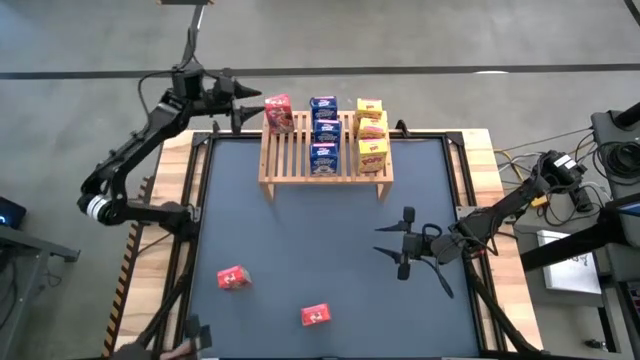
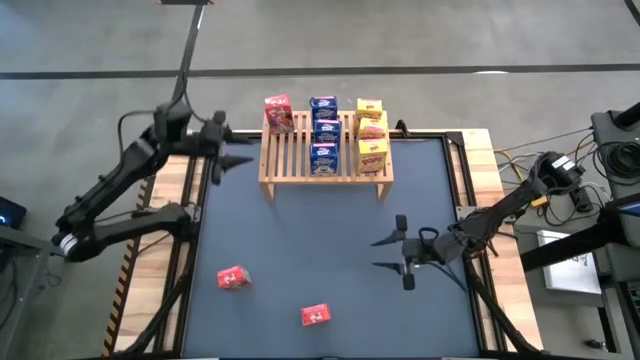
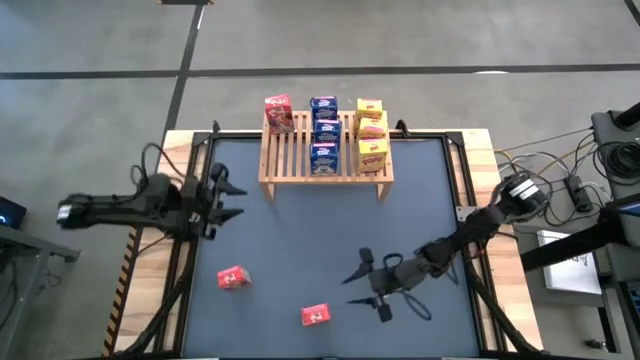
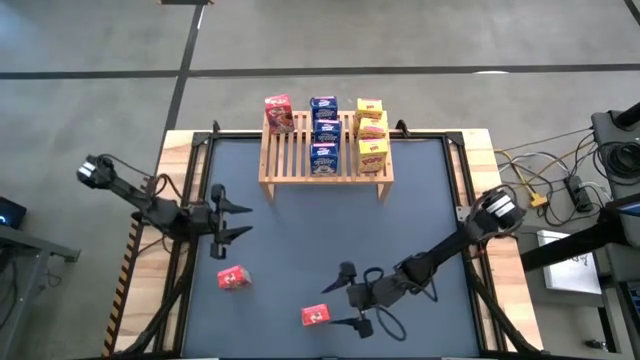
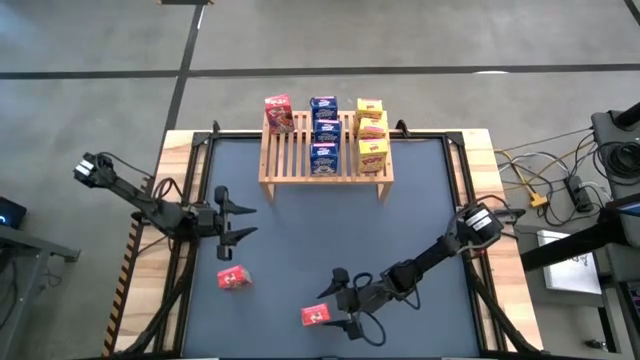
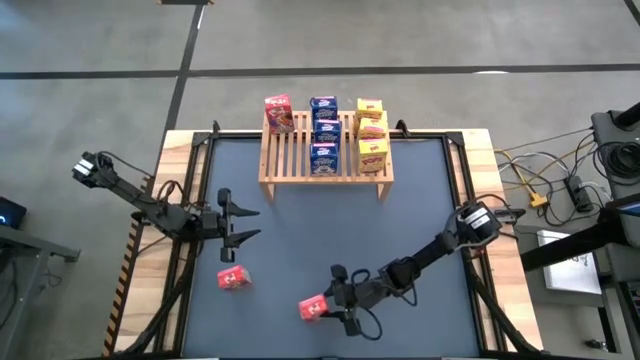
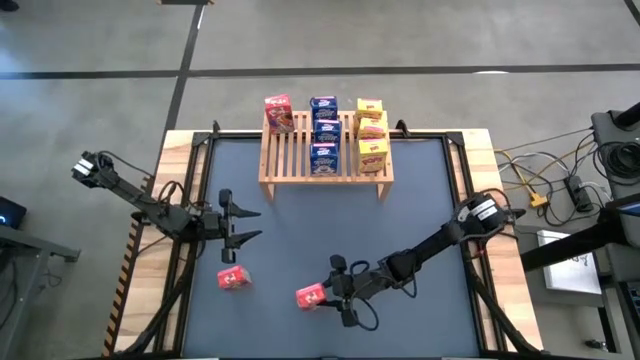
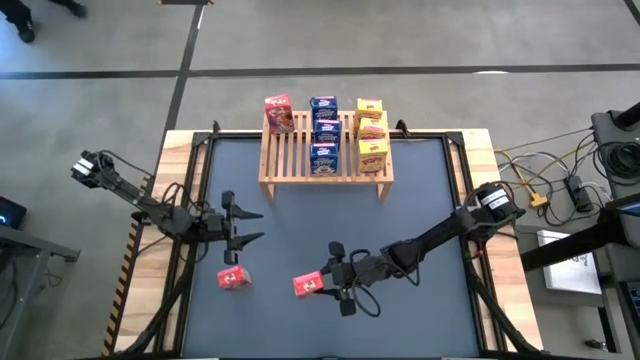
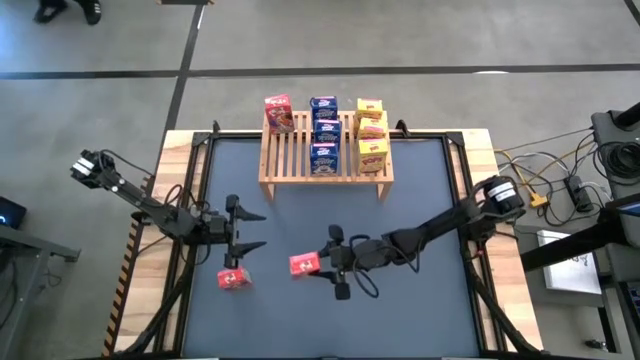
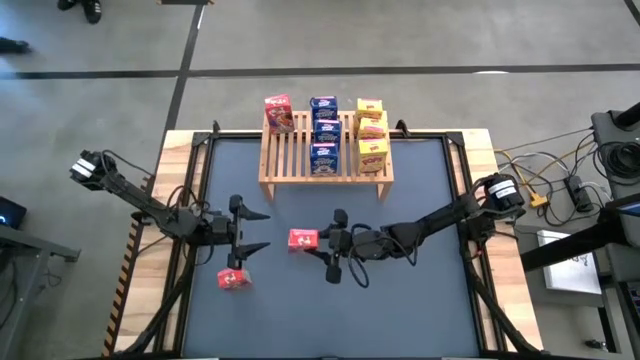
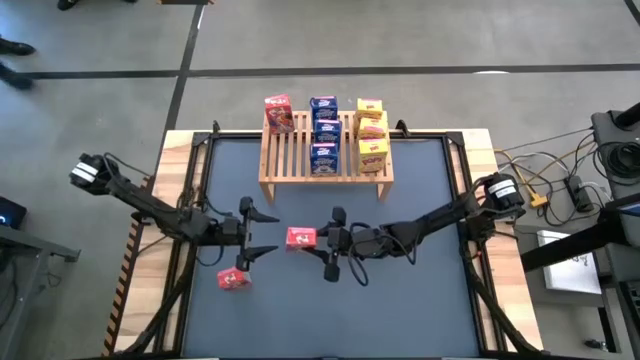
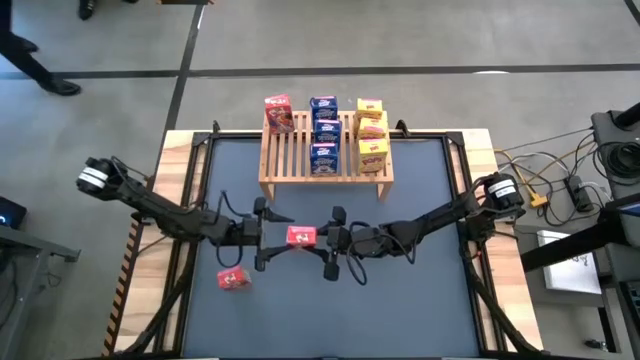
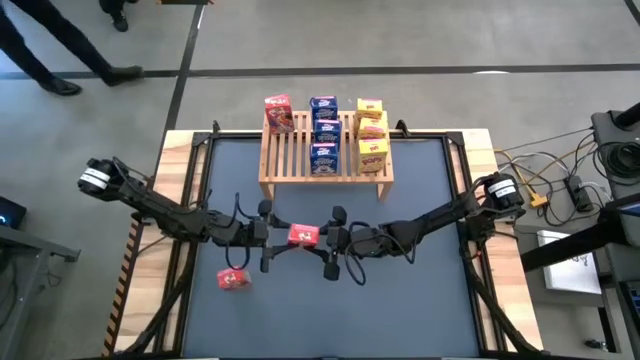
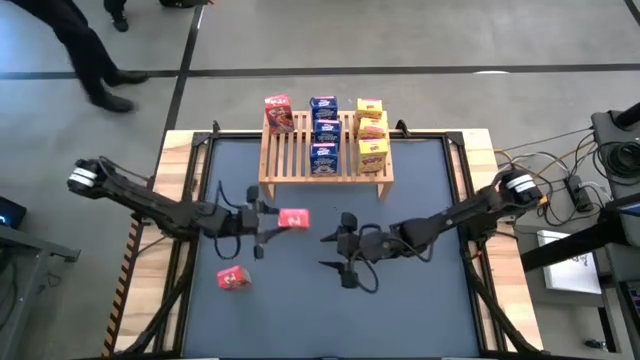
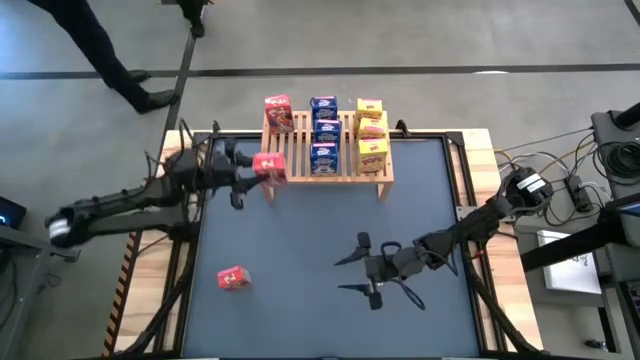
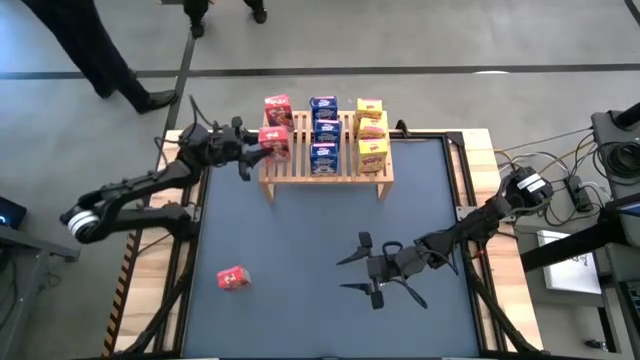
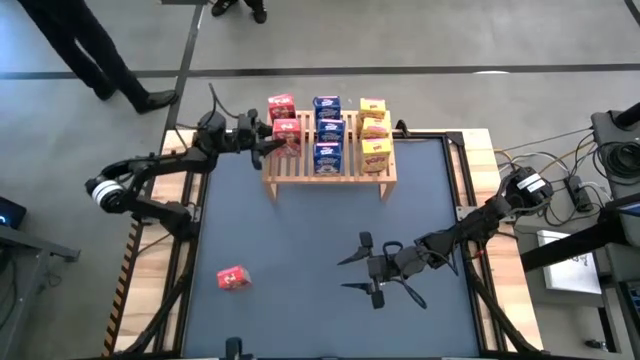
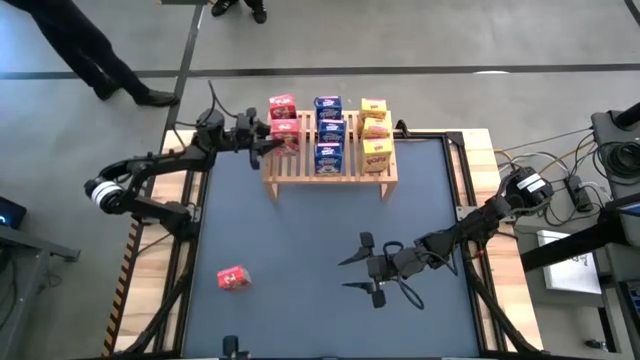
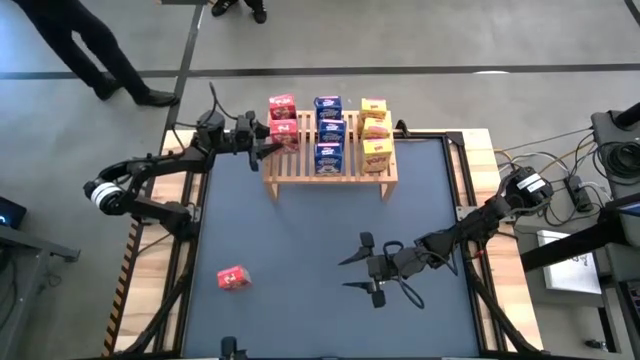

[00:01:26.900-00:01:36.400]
Task: Stack cereal on shelf
Put the right red cereal box on the shelf aligned with the other red cereal box

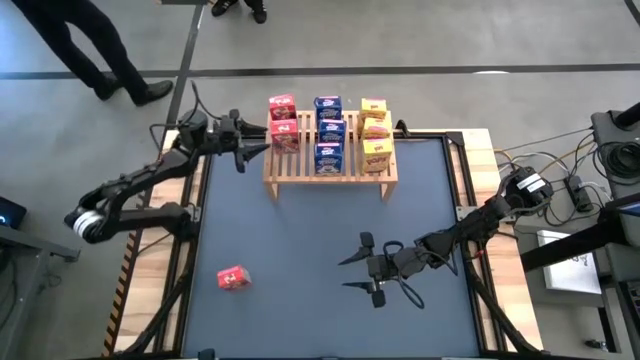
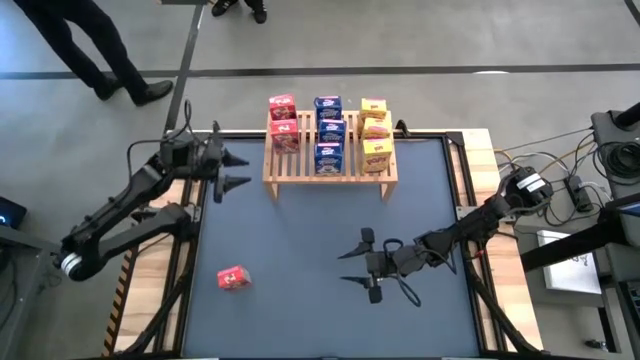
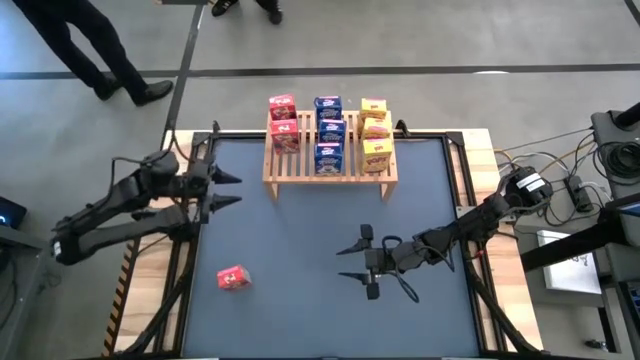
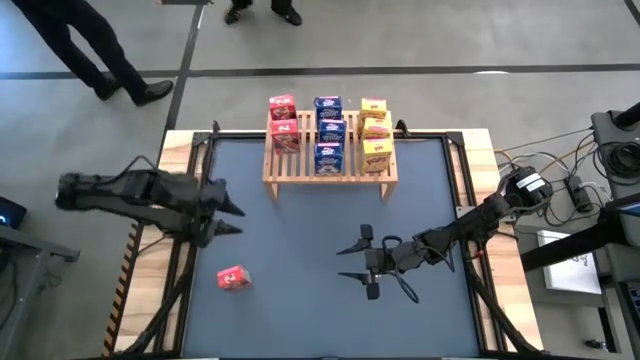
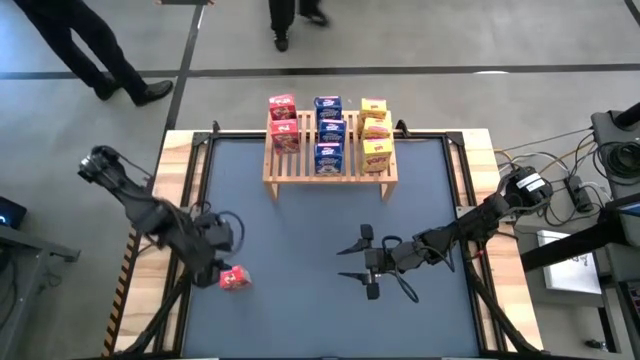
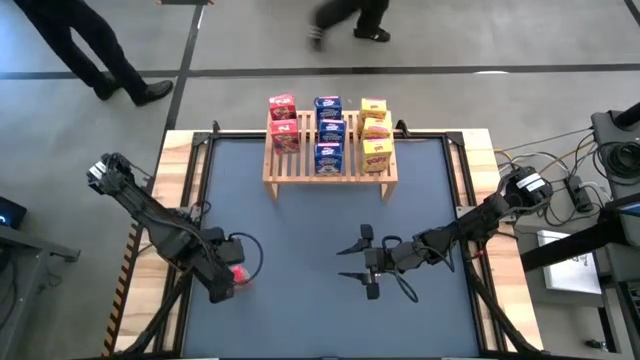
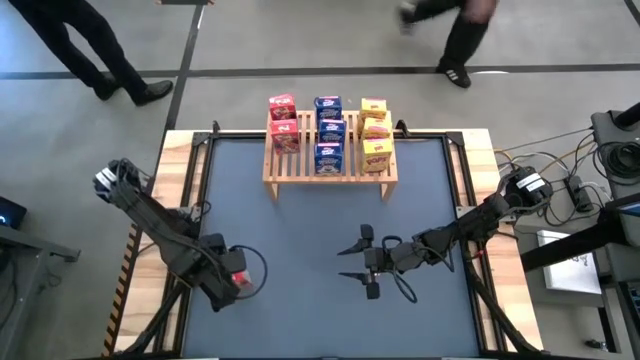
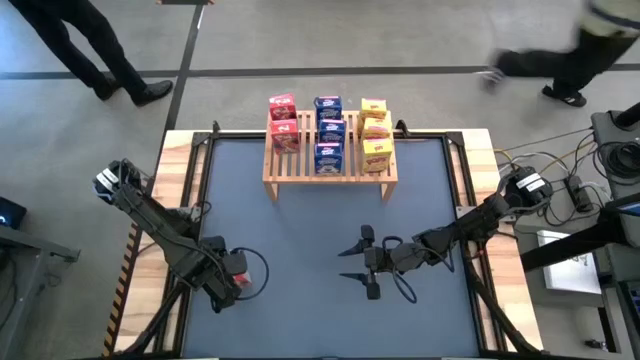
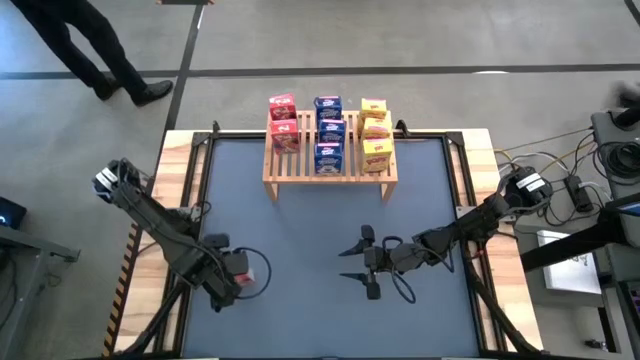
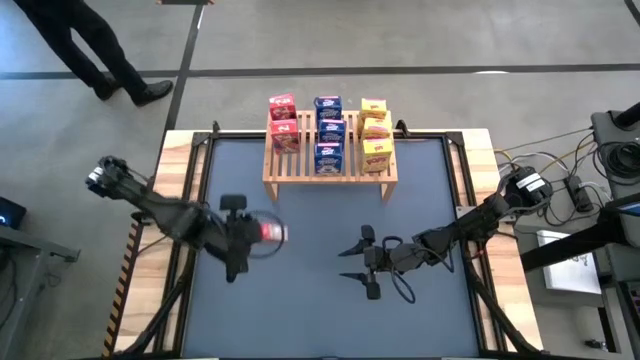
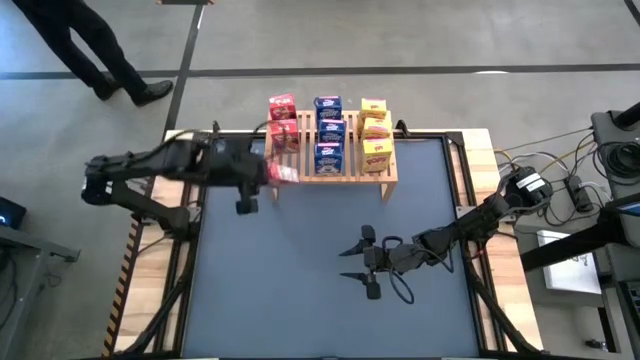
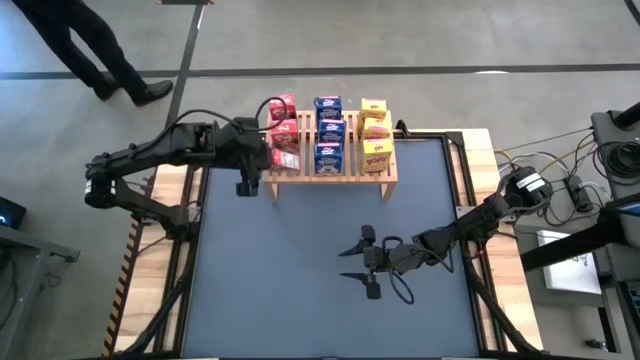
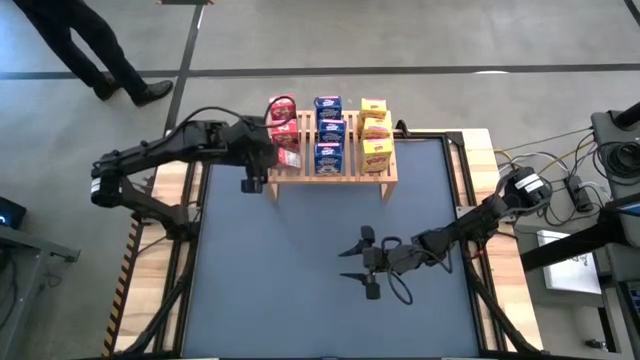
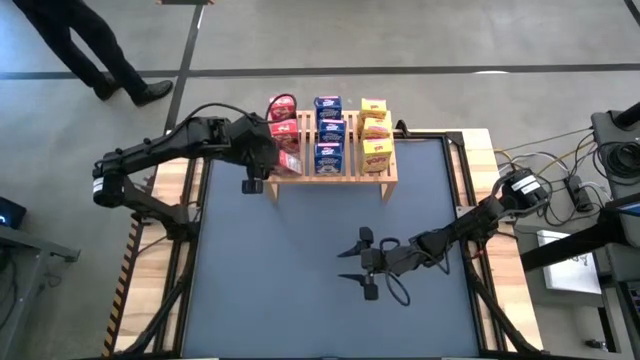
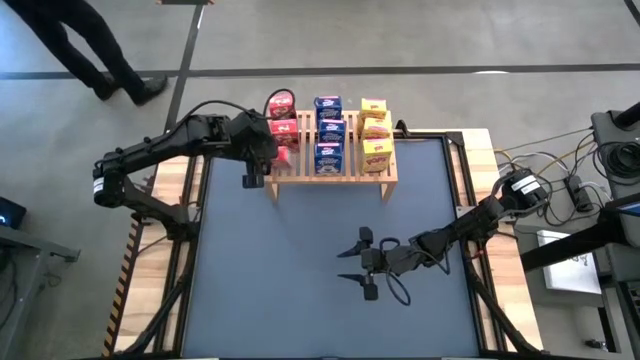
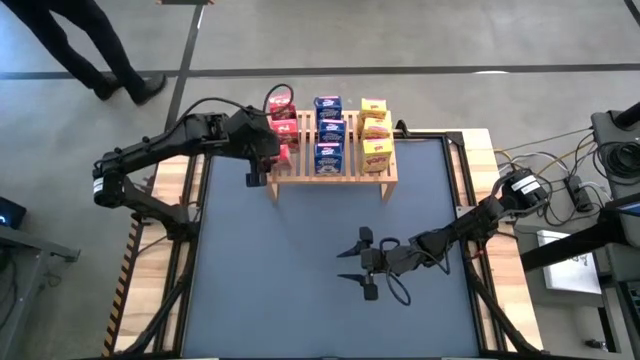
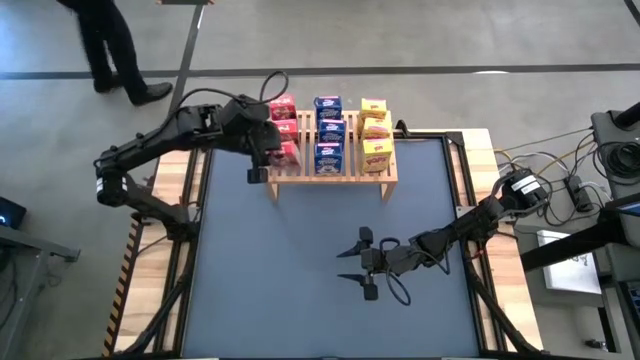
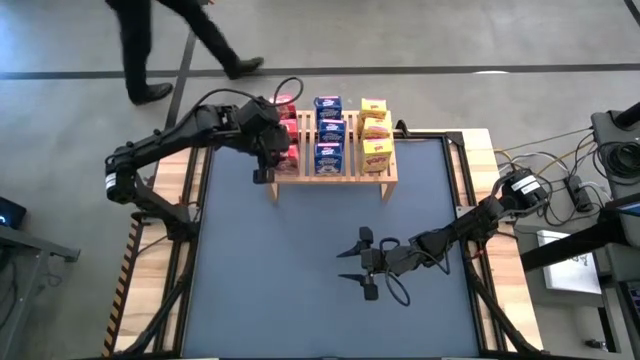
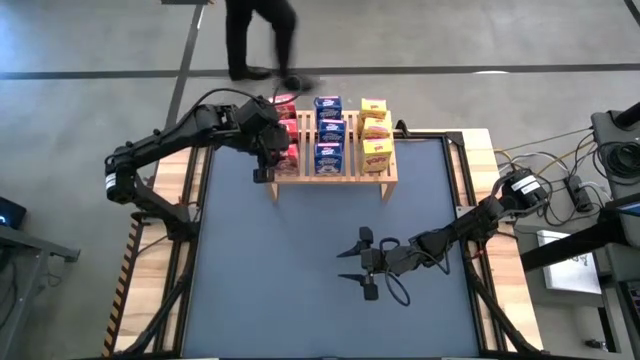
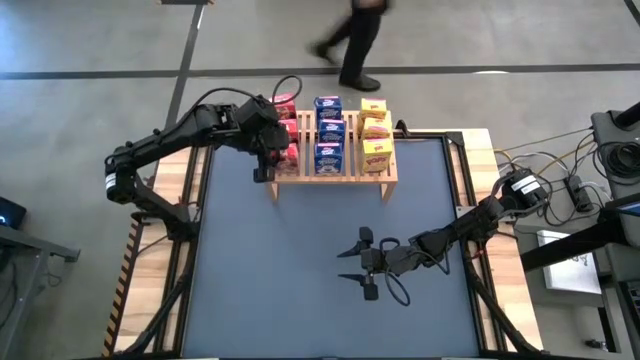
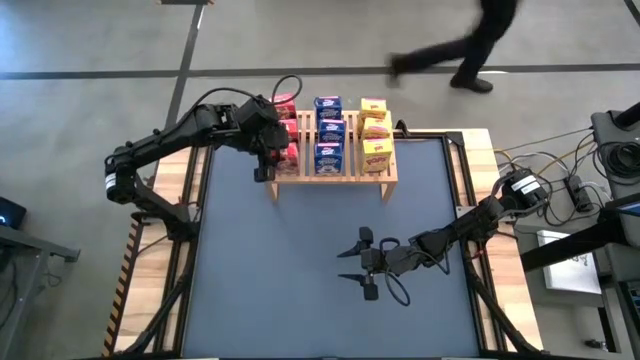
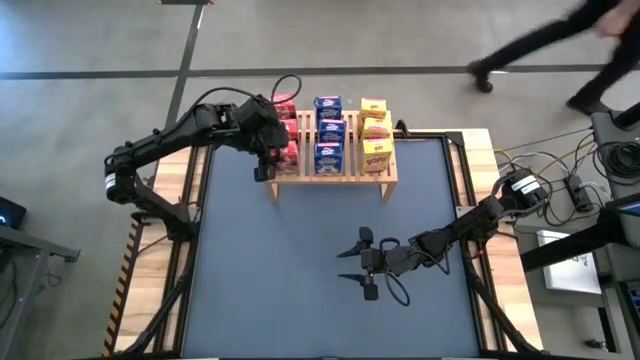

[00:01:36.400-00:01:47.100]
Put the red cereal box on the shelf aligned with the other red cereal box

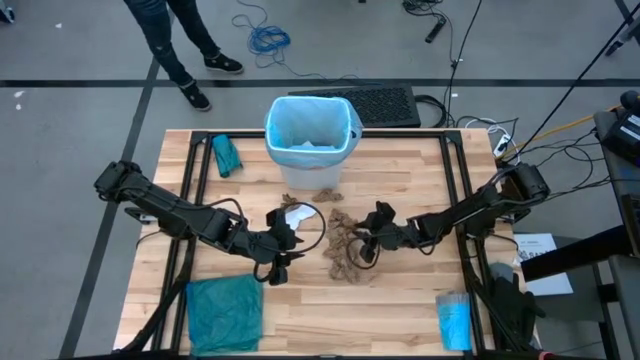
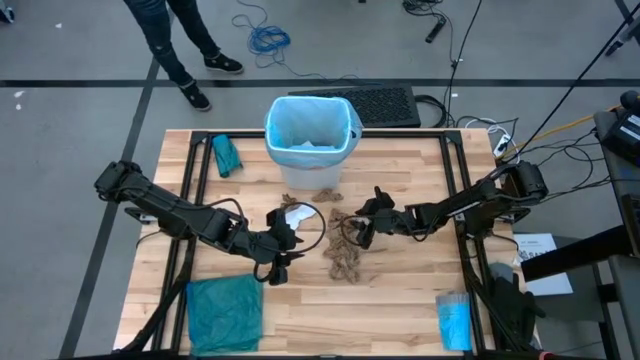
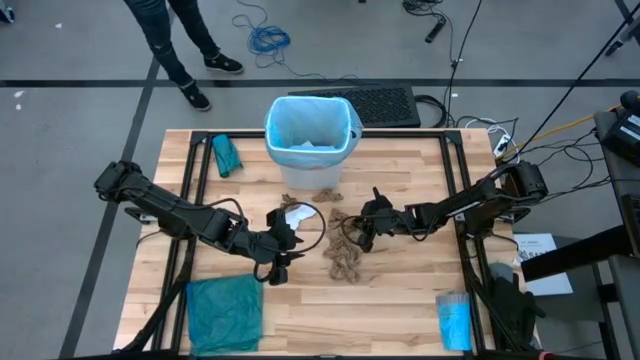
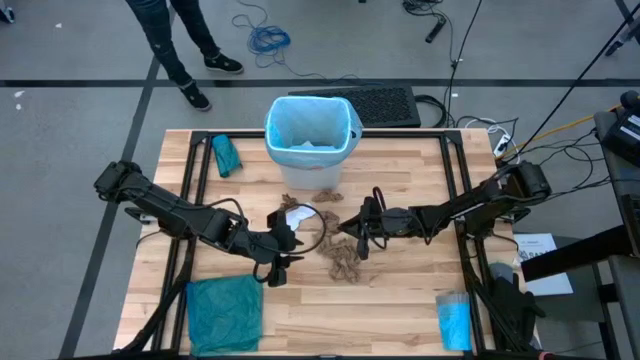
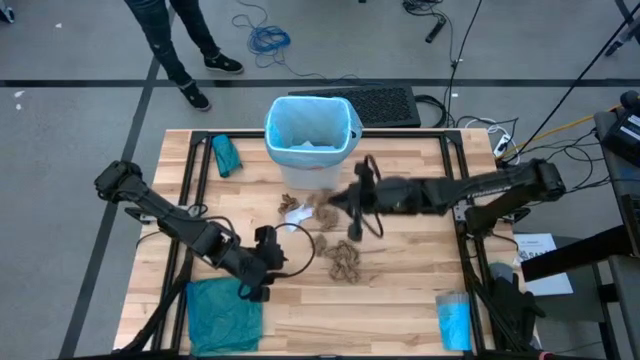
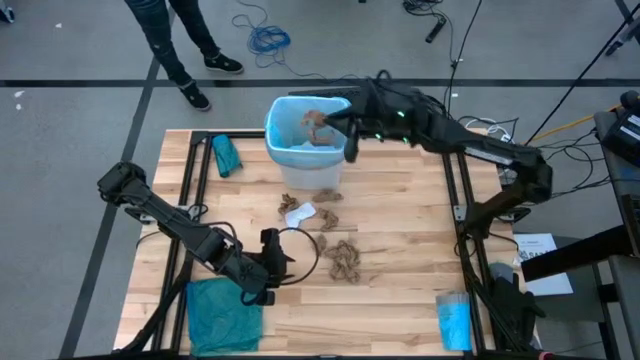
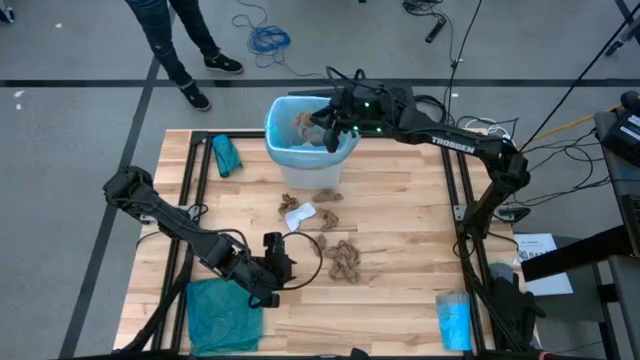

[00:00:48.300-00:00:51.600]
Task: place trash/remove bag and relplace
Put the brown paper into the blue trash bag inside the white trash bin
